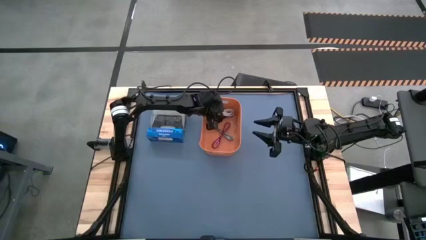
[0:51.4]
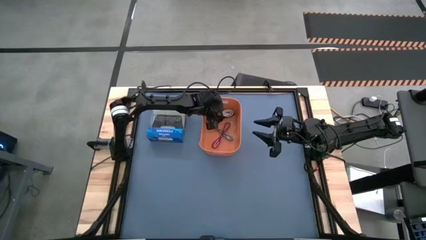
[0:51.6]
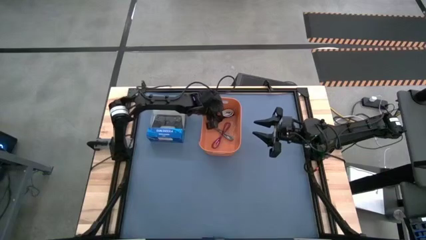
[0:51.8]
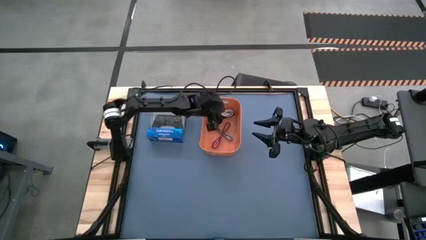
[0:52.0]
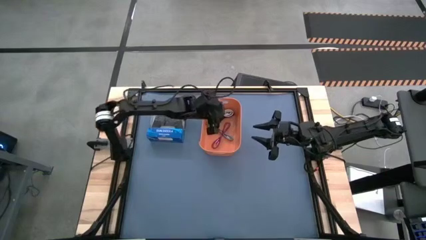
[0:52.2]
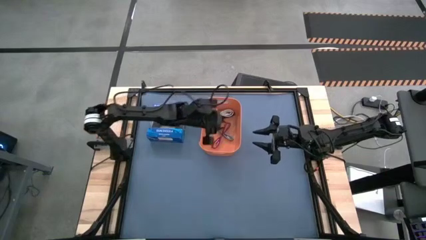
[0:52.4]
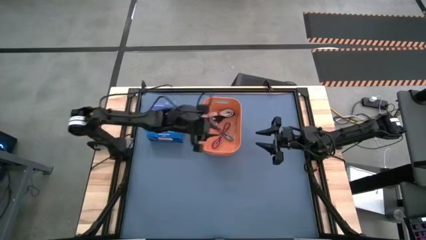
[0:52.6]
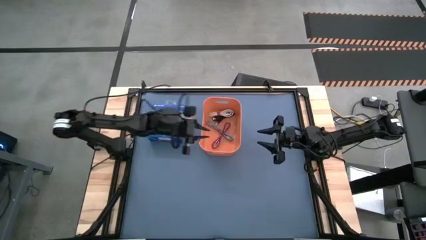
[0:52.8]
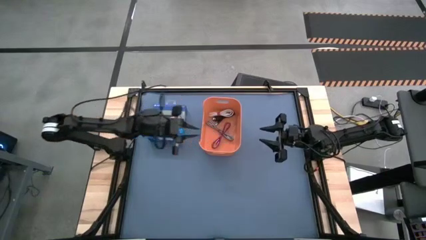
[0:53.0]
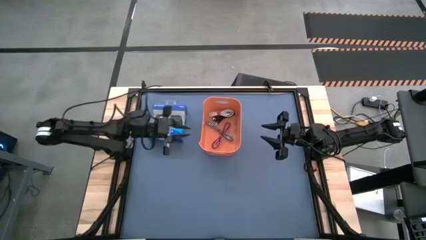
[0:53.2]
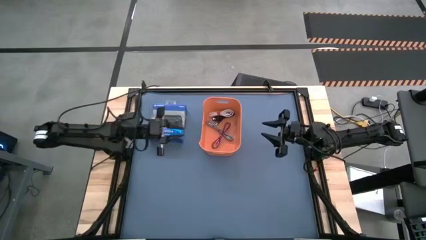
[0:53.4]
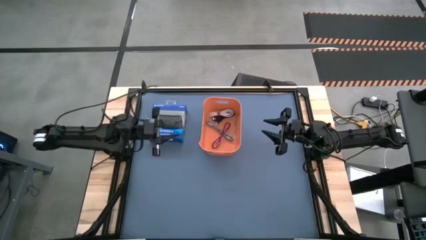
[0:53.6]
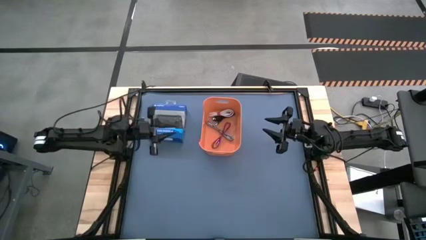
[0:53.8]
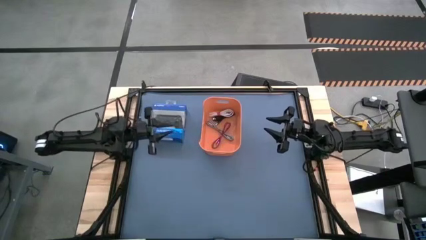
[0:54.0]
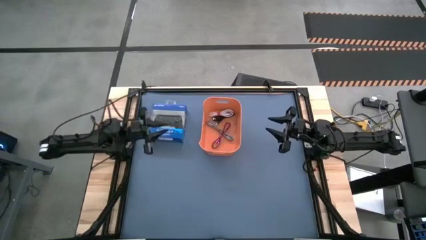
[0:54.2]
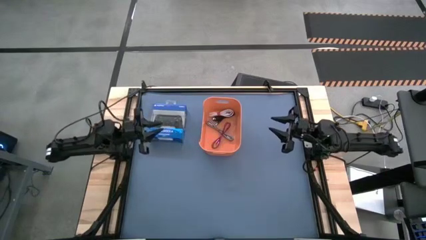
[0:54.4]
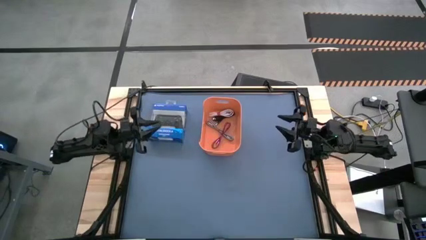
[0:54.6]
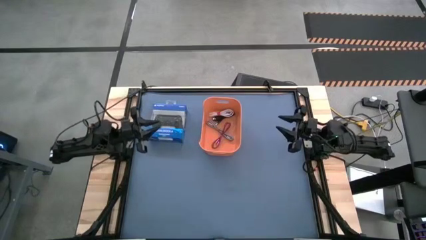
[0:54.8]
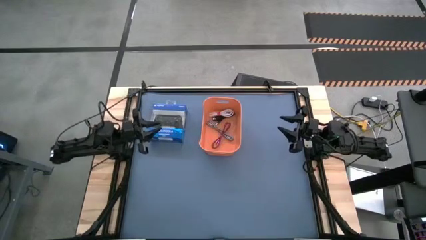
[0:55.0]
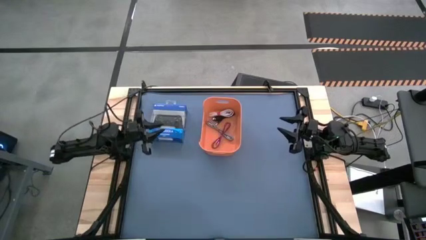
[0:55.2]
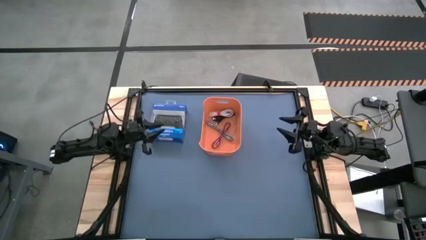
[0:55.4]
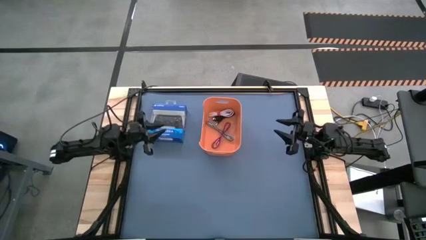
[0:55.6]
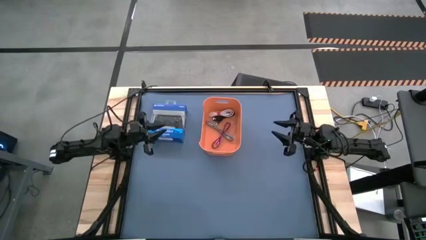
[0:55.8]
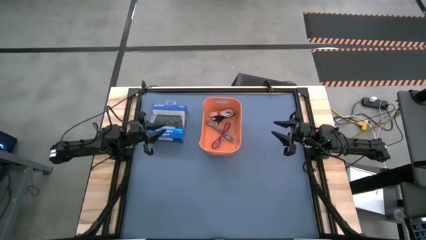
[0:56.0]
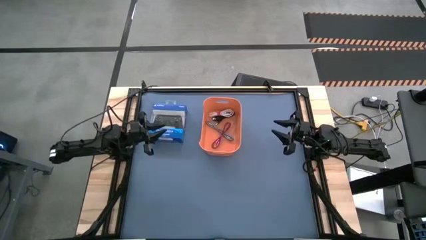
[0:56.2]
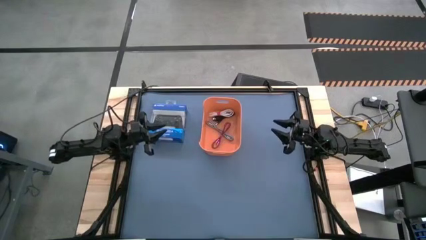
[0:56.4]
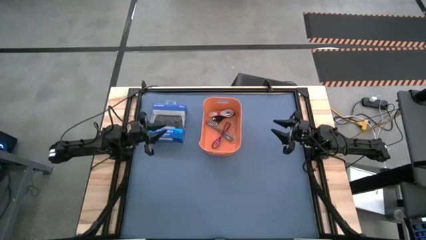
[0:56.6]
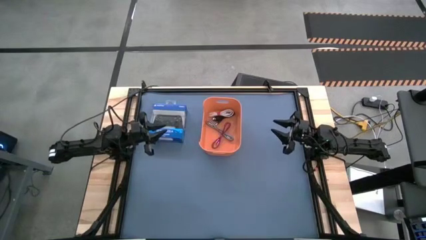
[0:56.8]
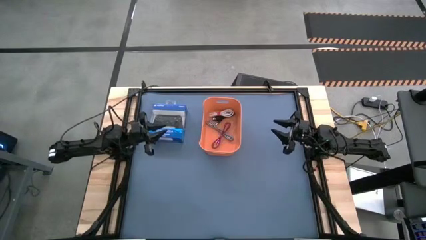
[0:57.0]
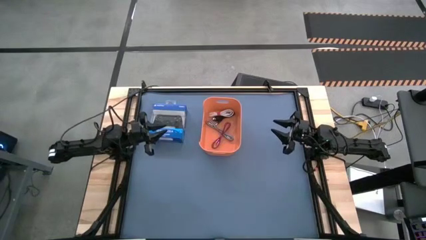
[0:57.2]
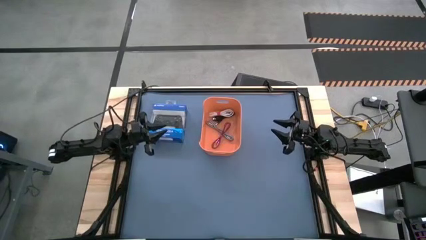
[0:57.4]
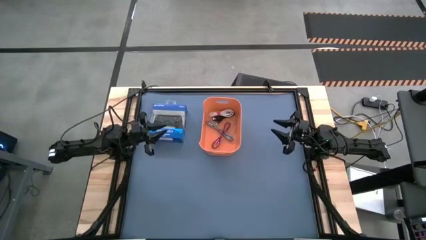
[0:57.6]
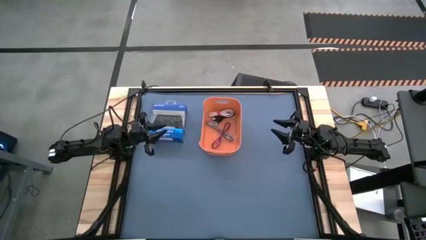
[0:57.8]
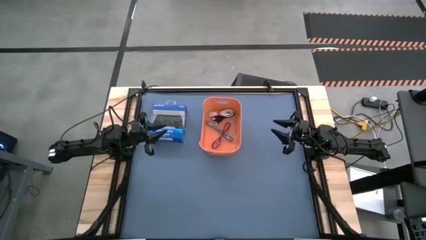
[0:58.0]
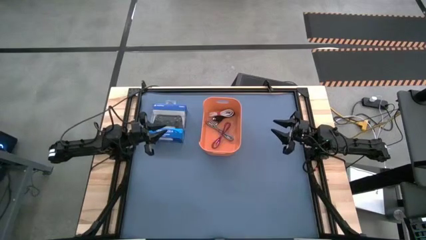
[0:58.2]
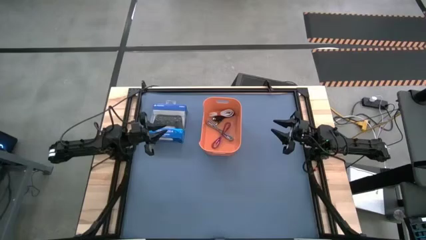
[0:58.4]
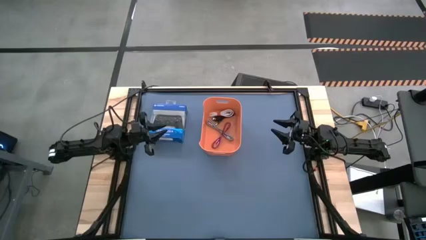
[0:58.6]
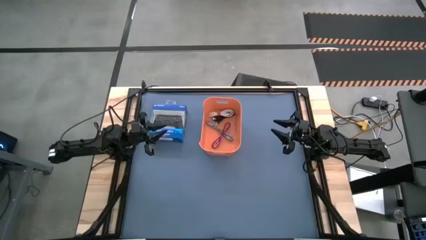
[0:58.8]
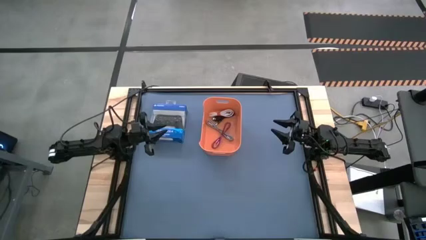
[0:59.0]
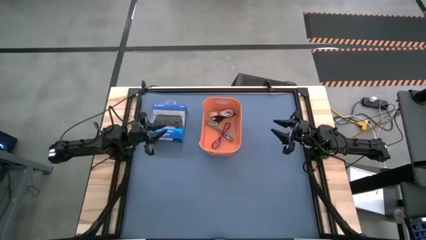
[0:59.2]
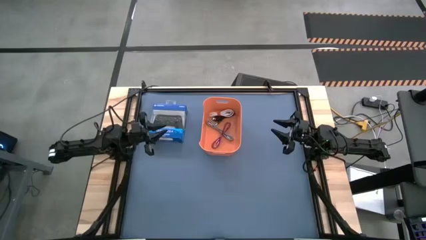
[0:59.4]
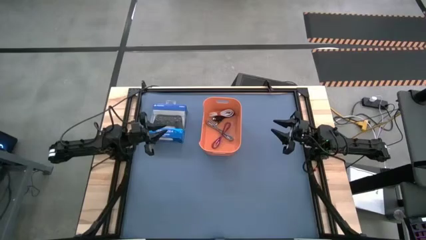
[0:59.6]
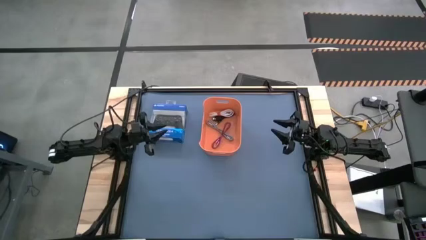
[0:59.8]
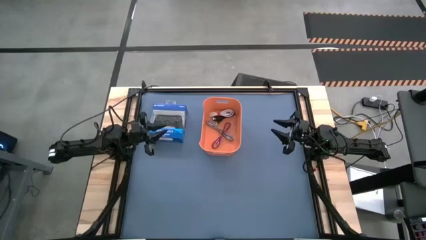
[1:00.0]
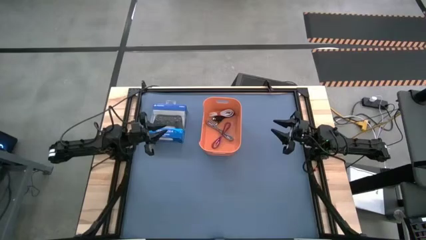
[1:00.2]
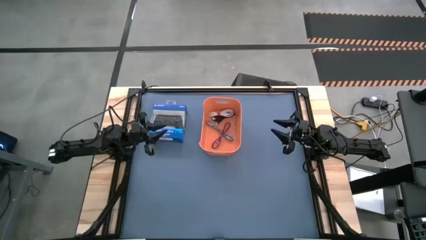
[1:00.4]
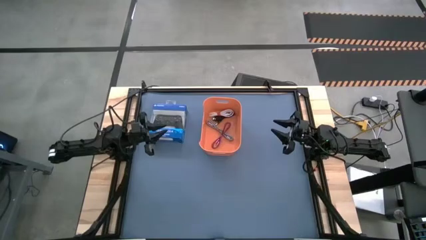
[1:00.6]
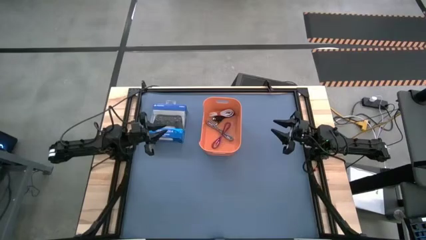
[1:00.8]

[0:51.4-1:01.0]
Task: Pick and place USB-C Cables
Return to Home Position

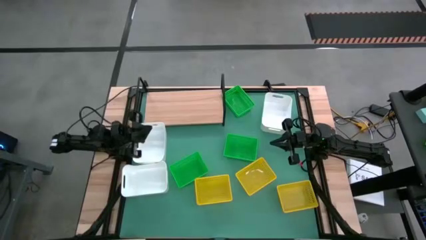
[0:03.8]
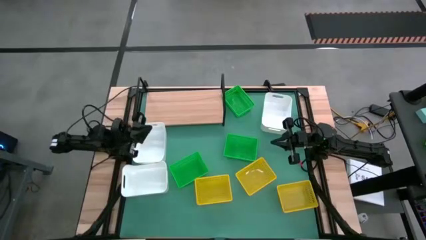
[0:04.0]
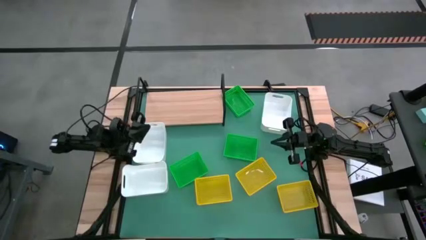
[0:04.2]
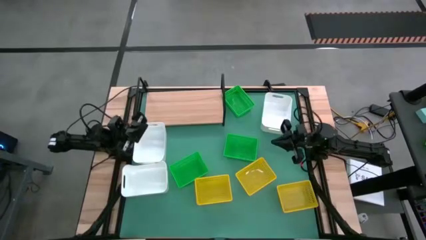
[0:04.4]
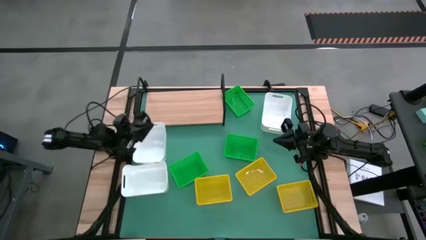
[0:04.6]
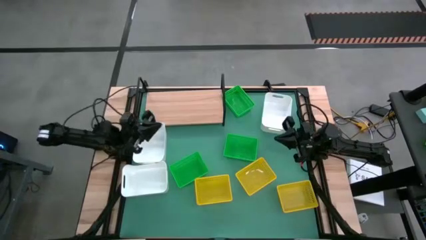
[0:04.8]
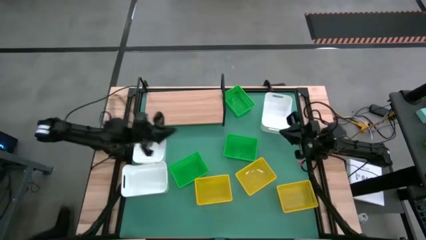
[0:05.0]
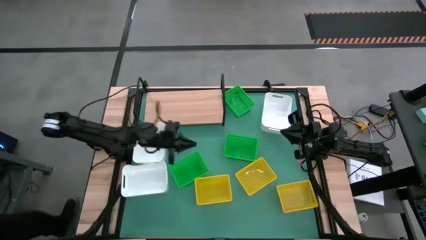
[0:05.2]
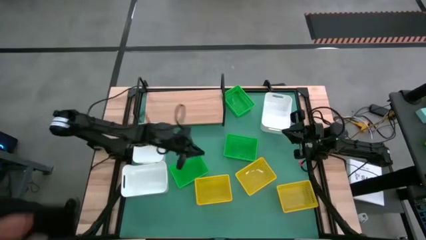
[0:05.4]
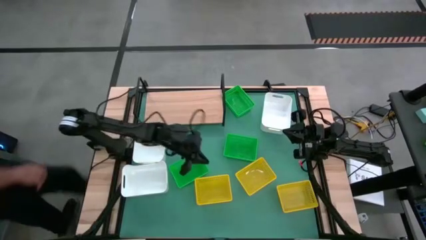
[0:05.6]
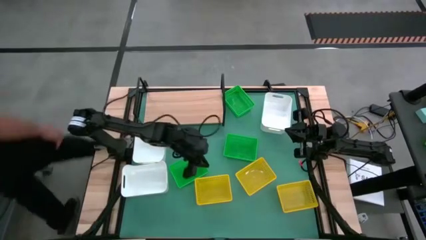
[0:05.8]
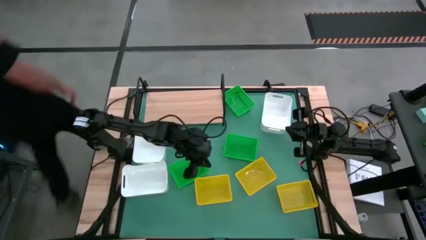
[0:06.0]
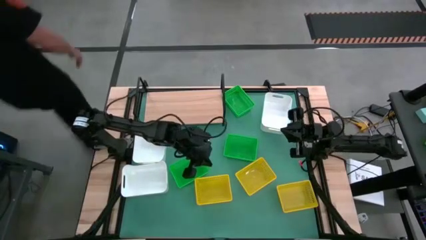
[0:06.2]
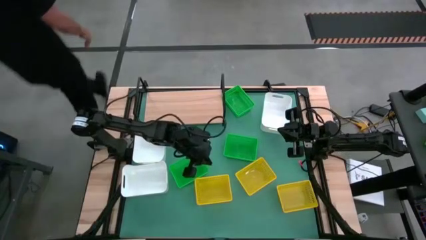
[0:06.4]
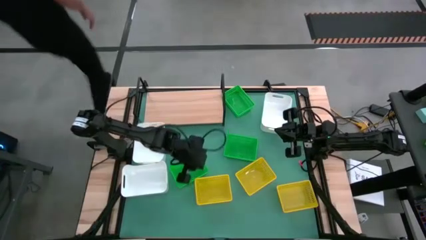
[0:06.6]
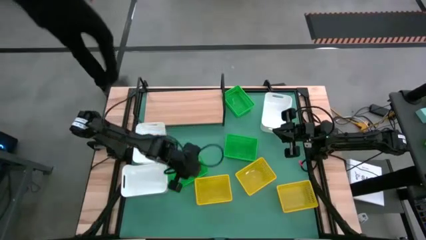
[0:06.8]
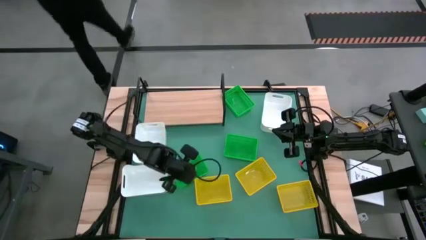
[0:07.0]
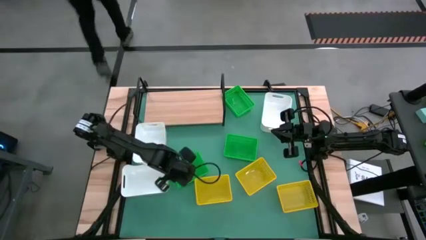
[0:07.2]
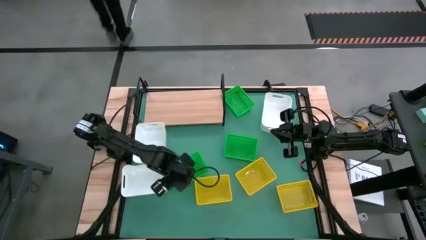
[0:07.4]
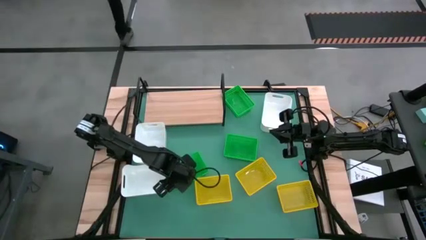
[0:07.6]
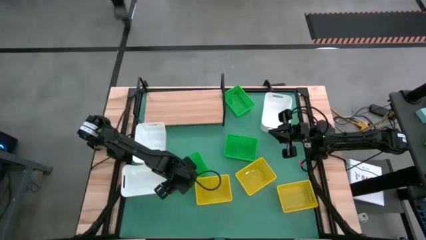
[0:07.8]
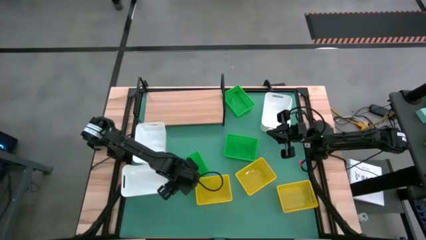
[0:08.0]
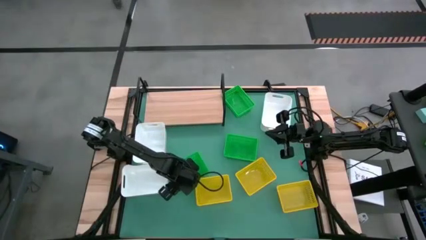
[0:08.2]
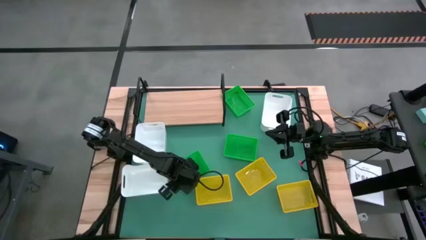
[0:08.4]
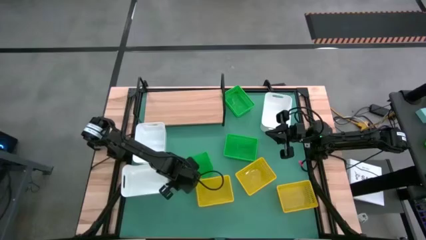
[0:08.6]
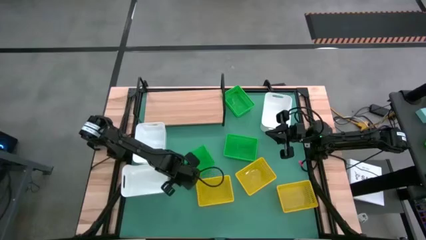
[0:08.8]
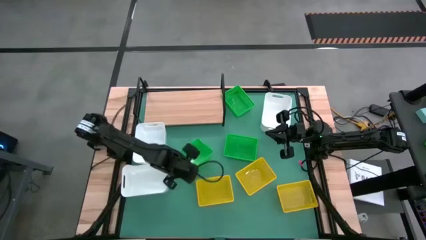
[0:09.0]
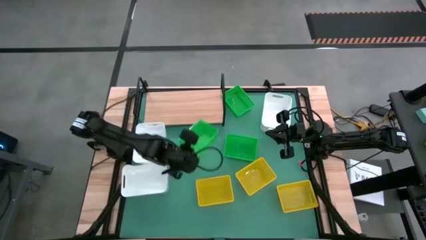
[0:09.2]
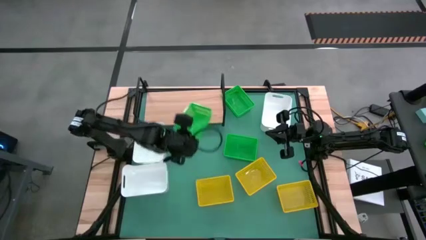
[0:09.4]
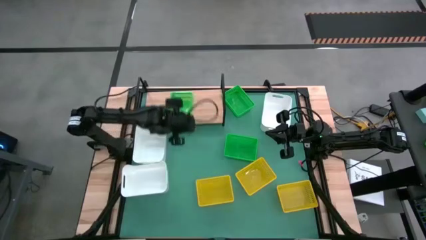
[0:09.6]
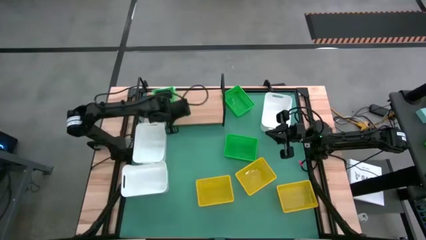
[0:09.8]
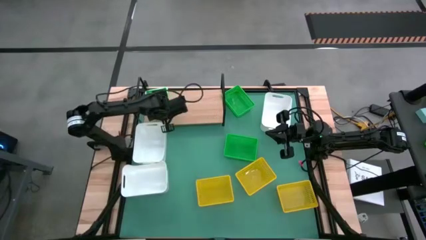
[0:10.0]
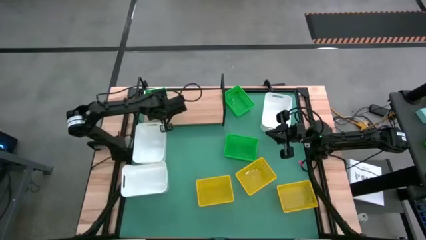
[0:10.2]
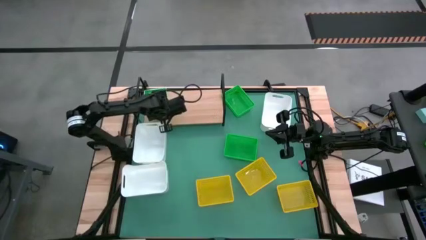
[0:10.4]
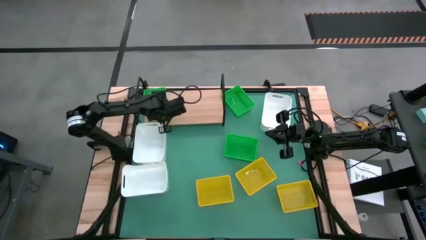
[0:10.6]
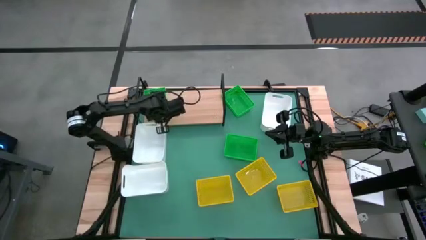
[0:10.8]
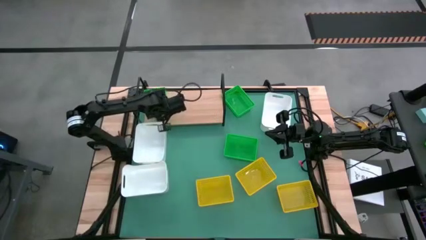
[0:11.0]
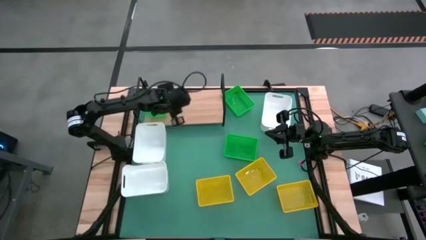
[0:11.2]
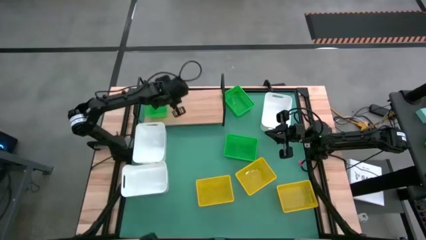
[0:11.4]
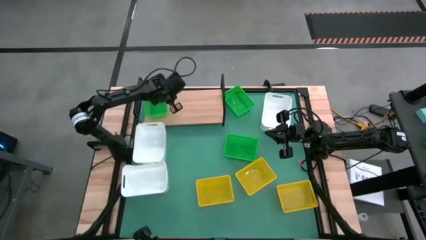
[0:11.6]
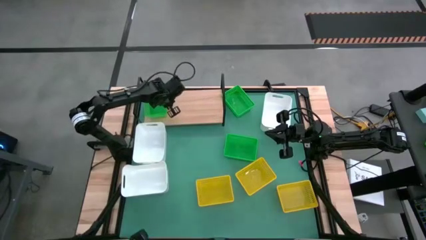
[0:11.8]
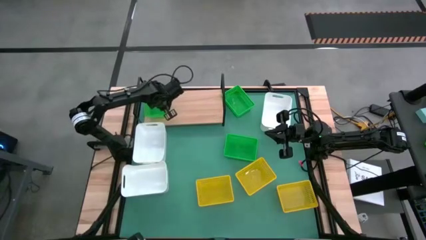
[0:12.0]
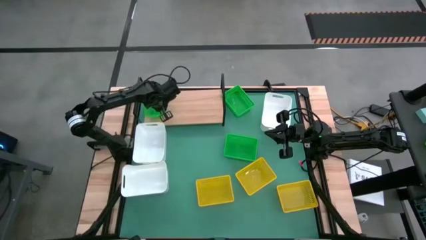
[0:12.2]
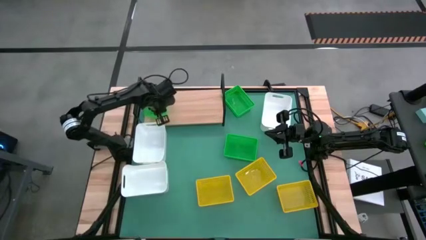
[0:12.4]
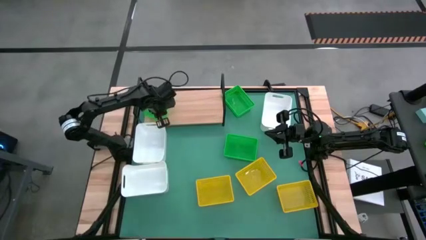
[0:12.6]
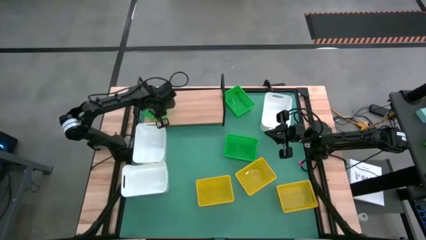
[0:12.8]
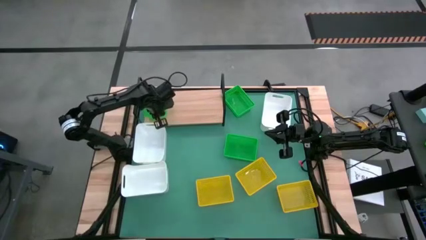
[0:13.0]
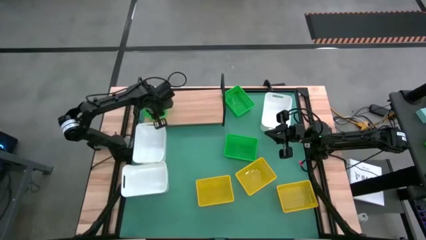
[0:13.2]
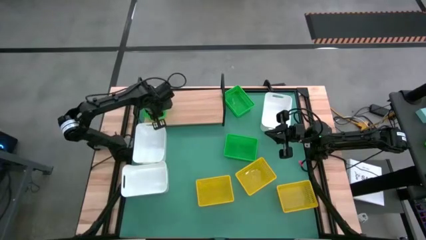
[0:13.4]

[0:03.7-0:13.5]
Task: Stack baskets on shelf by color
Put the bottom left green bin on the shelf
